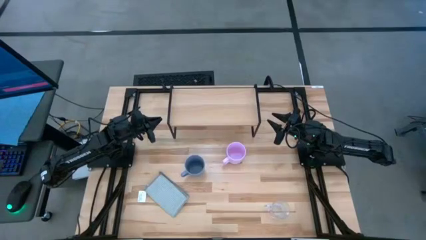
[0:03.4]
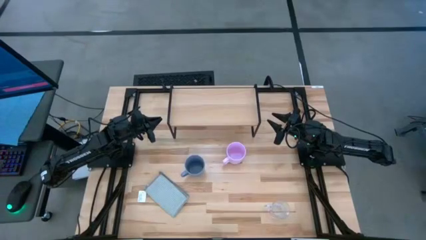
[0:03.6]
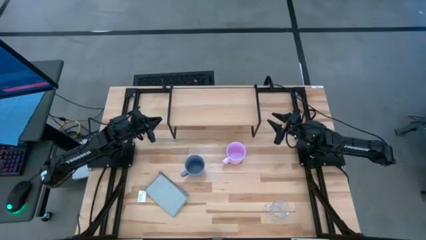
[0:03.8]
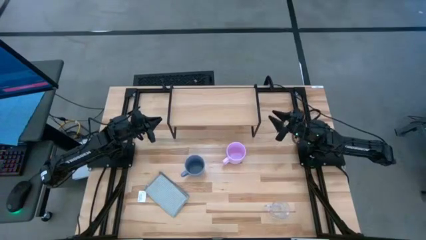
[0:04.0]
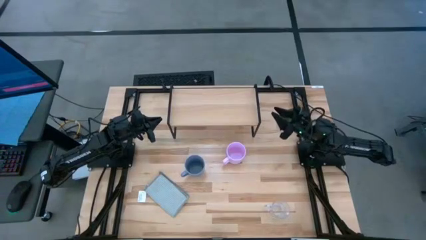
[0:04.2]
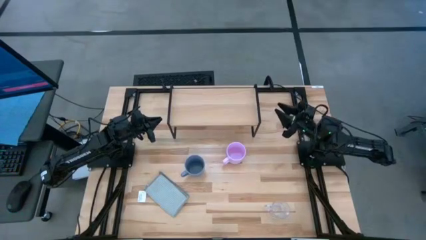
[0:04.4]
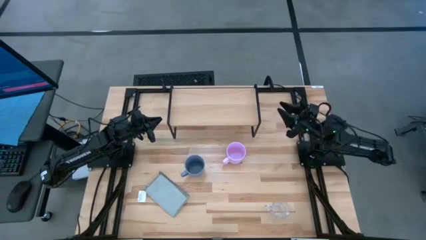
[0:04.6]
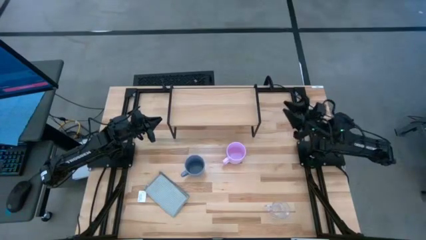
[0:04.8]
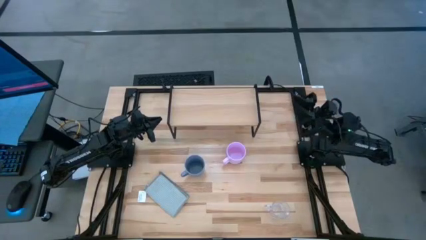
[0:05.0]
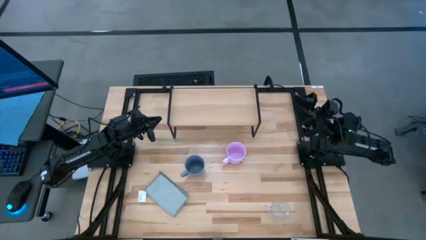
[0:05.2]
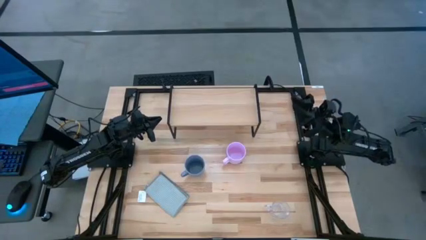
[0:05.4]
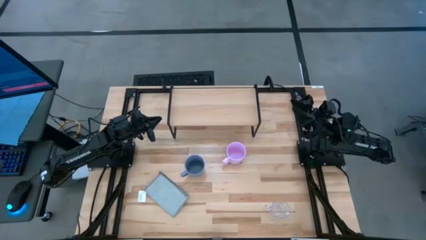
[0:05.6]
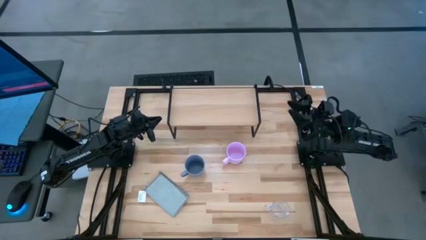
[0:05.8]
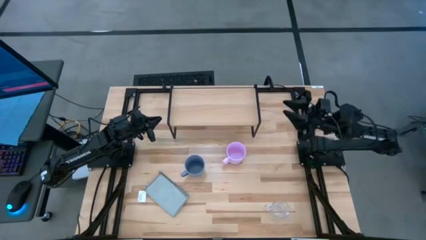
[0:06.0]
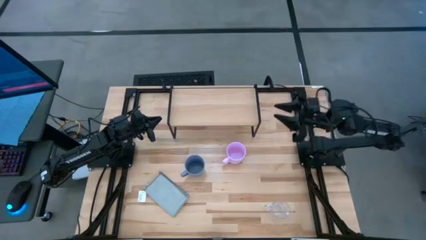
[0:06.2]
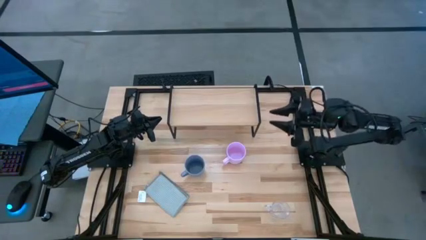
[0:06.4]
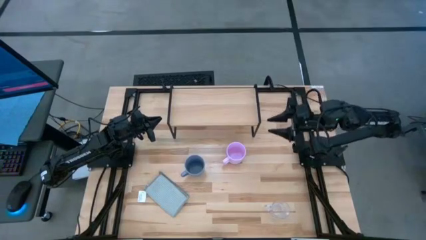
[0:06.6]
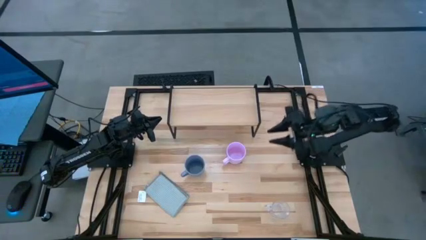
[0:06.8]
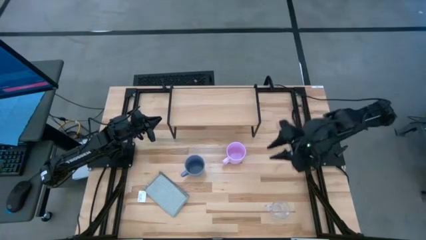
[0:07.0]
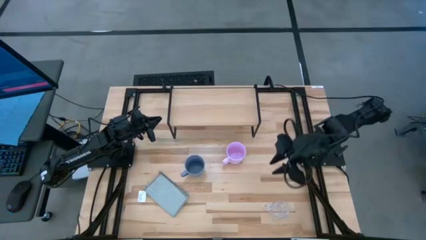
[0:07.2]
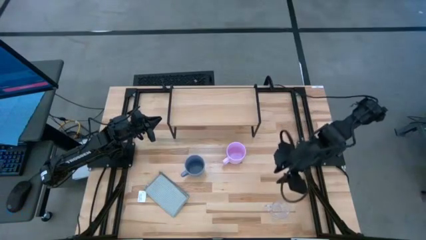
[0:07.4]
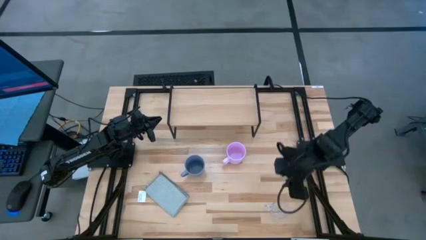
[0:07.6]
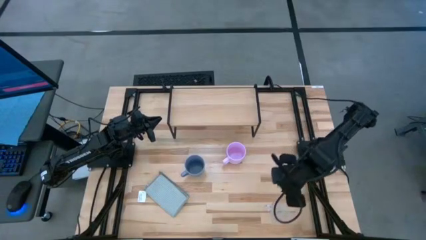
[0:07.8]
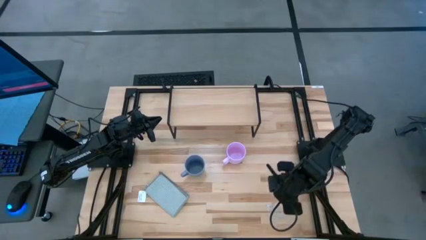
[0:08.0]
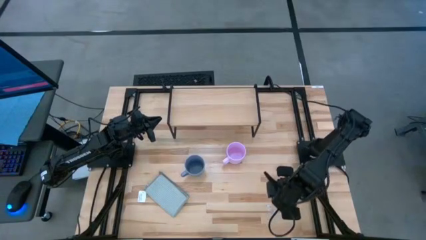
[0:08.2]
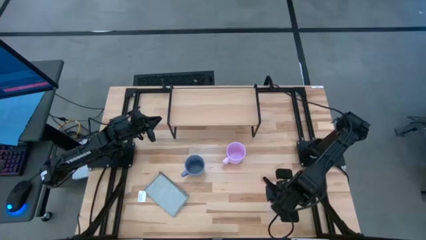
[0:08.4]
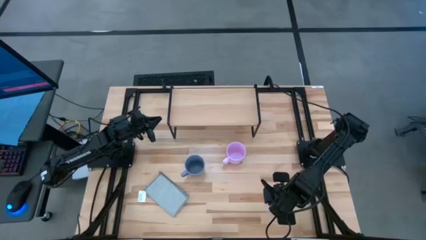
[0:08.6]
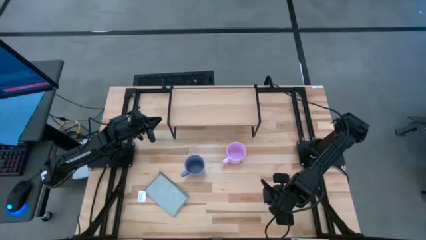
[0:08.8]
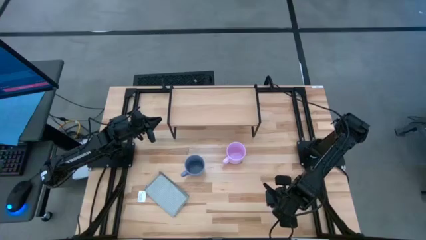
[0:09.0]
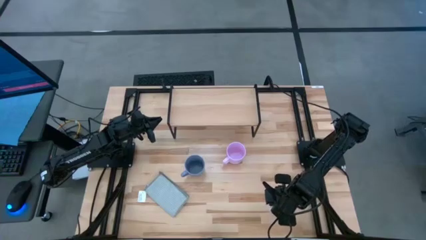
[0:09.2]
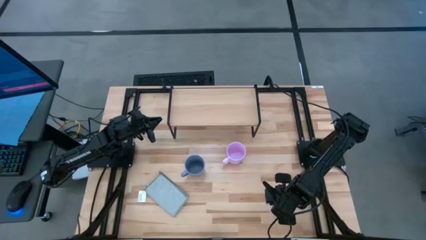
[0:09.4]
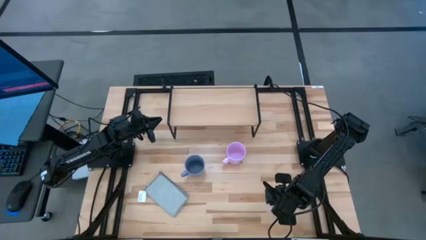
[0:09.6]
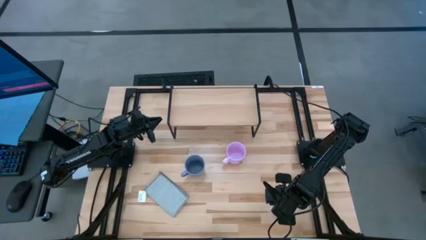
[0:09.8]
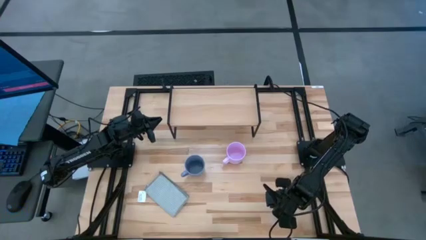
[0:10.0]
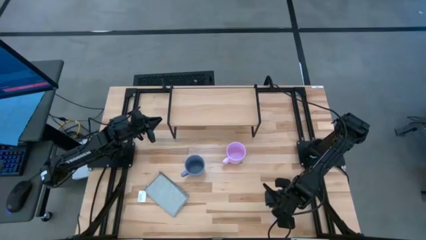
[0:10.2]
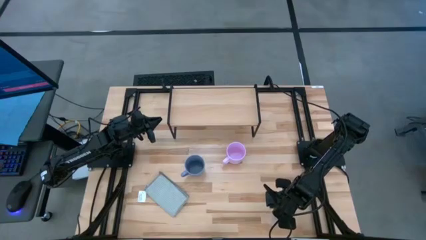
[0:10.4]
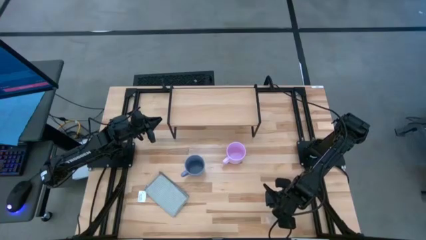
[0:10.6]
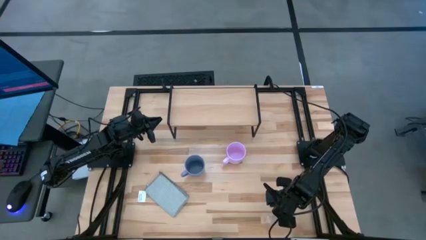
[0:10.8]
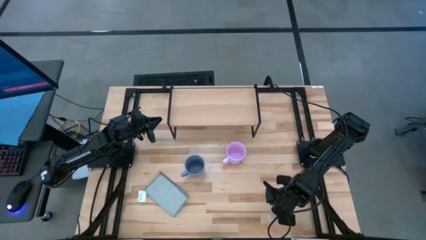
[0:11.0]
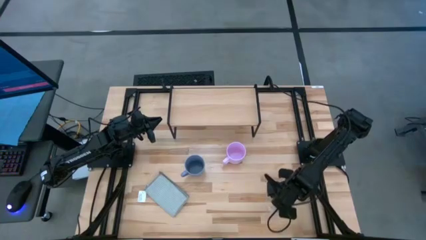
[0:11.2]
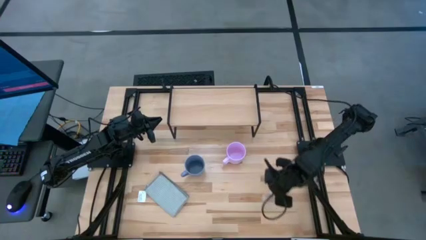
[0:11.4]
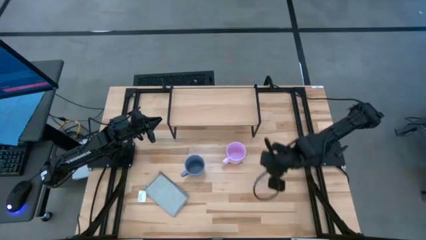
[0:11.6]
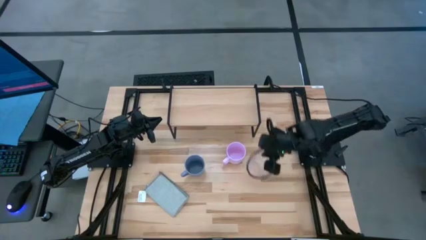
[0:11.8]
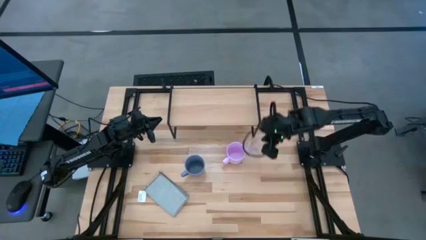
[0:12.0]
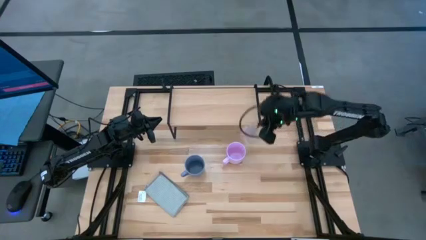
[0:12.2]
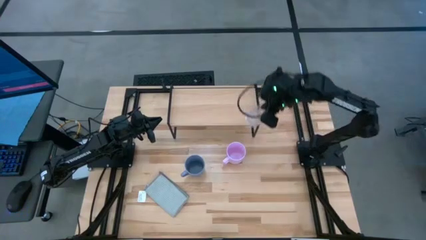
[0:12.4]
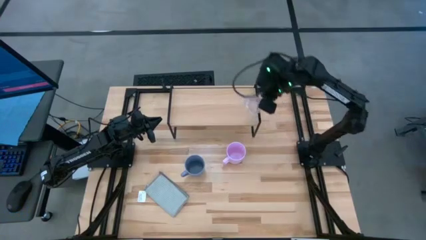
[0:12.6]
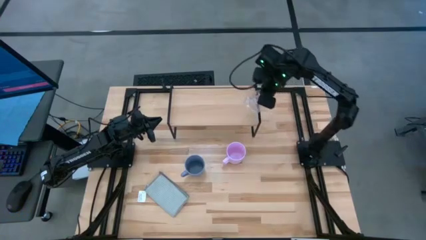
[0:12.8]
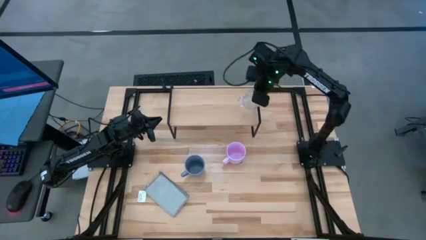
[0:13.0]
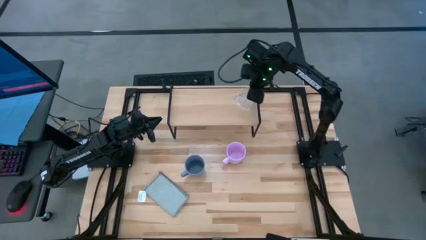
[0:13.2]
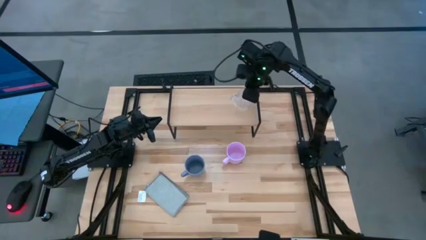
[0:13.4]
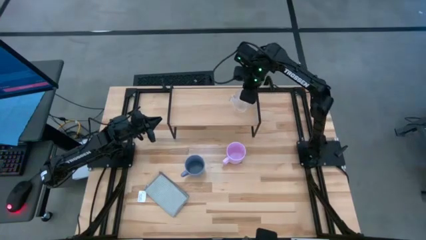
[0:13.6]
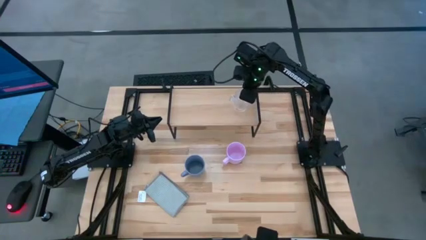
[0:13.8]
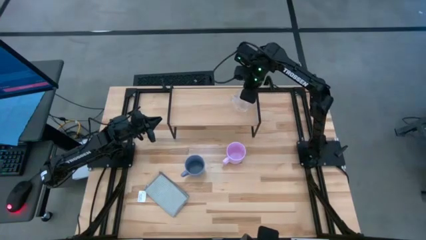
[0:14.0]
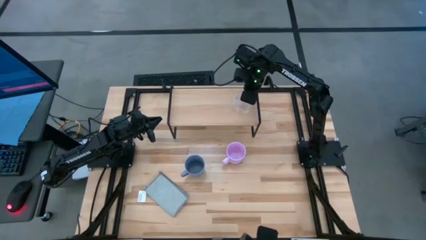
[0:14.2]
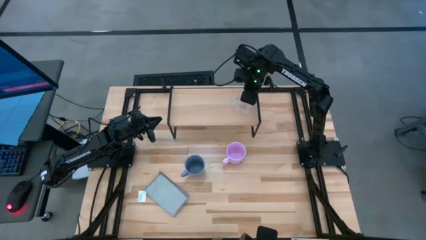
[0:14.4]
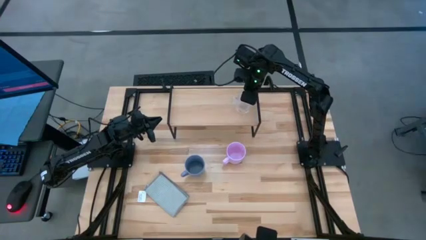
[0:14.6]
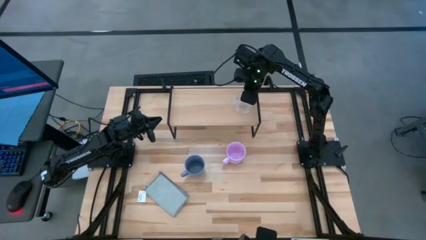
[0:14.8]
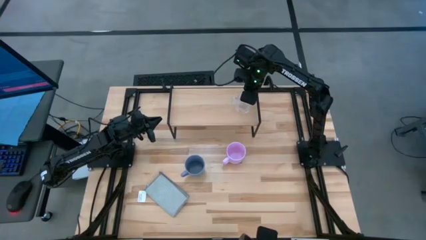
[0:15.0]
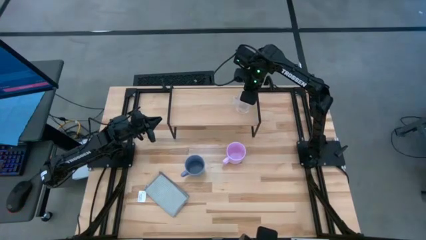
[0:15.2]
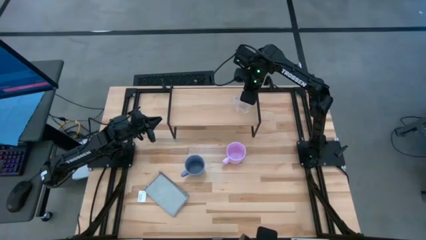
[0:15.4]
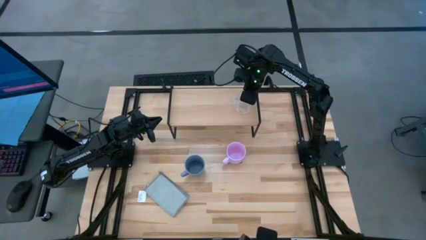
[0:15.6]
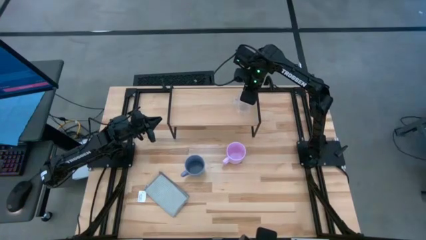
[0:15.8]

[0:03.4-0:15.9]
Task: Stack small to large cups/mugs on shelf
Put the transparent mug on the shelf
